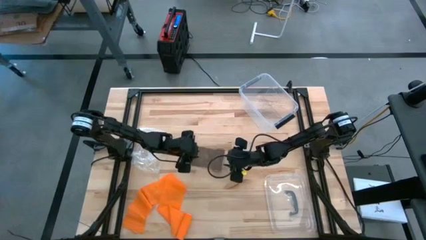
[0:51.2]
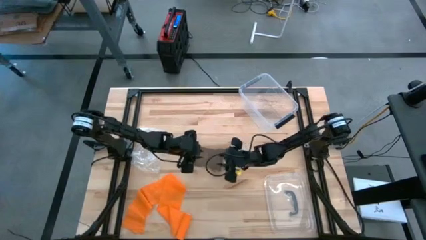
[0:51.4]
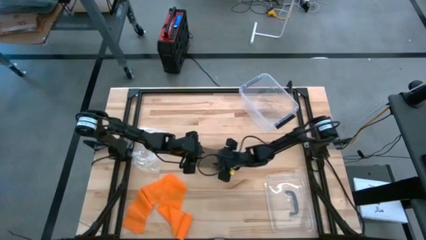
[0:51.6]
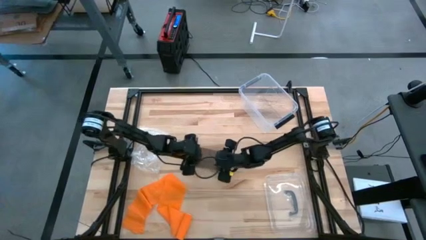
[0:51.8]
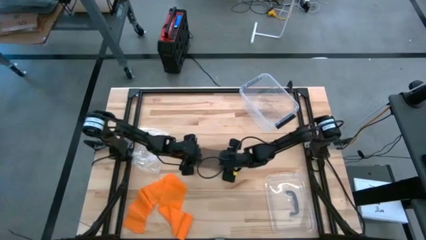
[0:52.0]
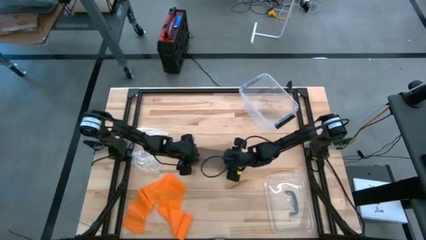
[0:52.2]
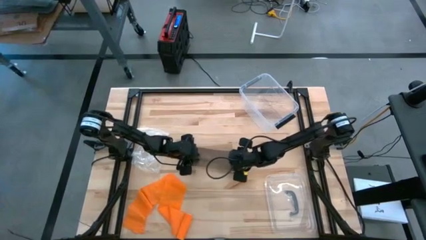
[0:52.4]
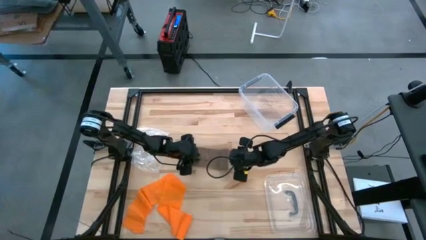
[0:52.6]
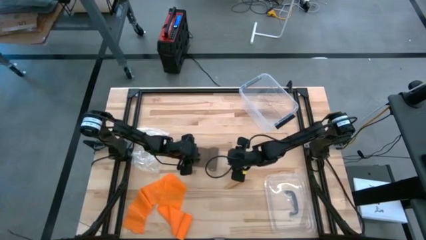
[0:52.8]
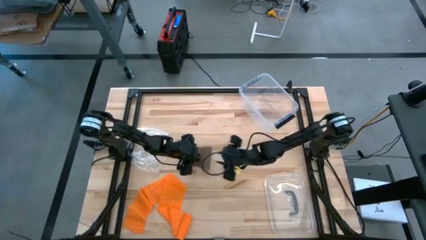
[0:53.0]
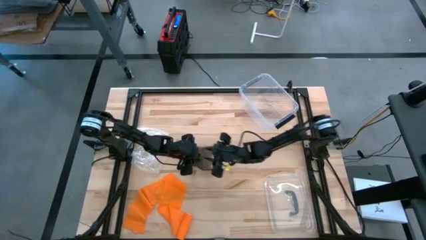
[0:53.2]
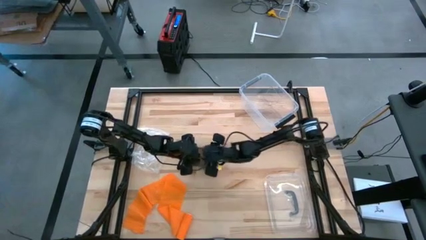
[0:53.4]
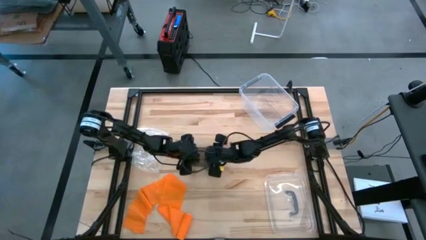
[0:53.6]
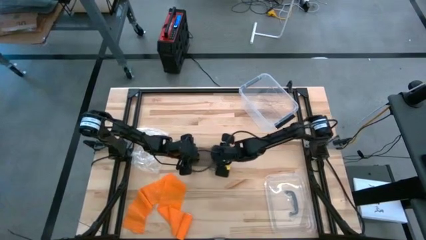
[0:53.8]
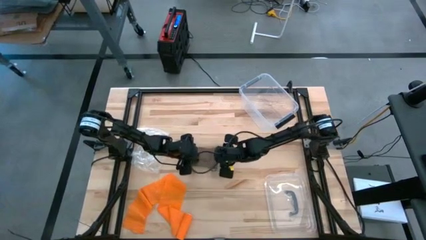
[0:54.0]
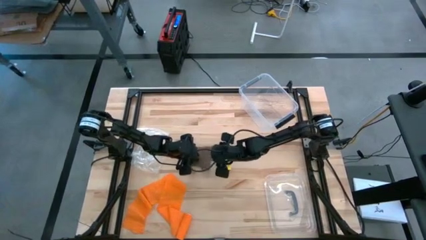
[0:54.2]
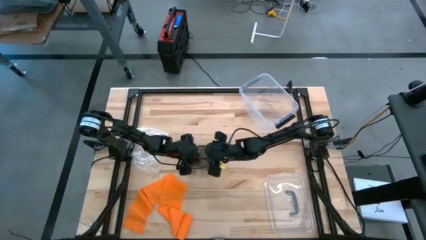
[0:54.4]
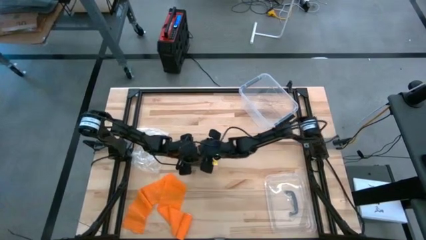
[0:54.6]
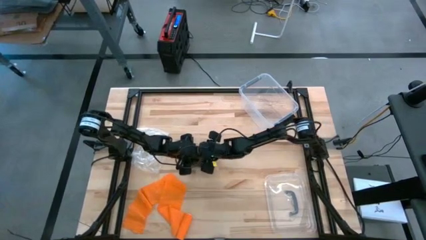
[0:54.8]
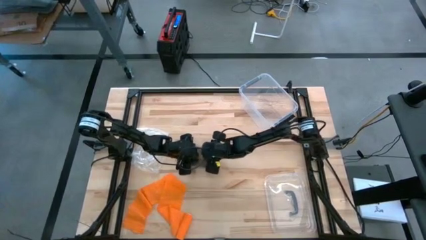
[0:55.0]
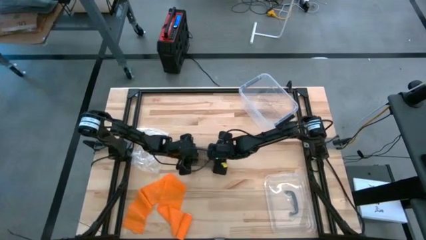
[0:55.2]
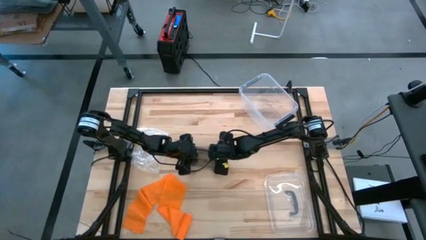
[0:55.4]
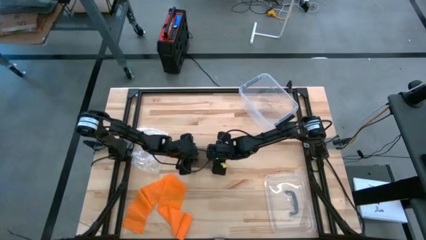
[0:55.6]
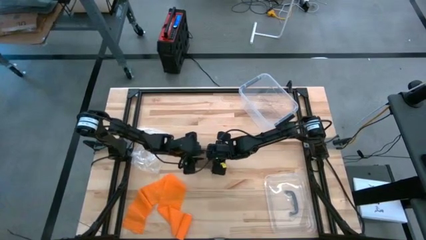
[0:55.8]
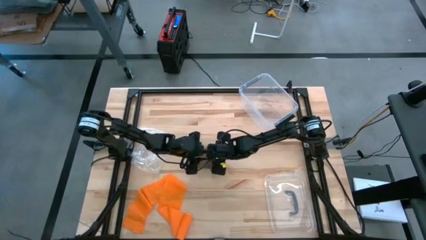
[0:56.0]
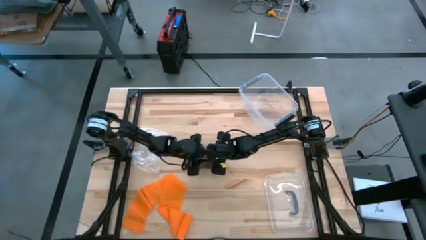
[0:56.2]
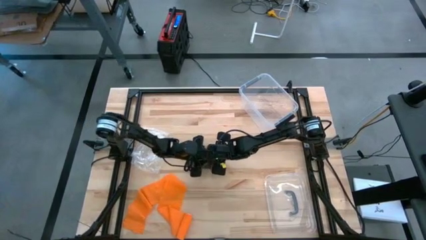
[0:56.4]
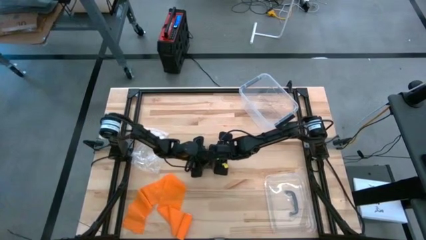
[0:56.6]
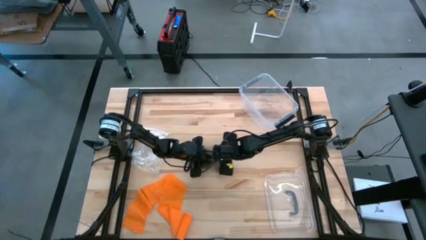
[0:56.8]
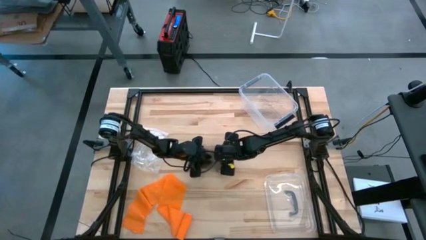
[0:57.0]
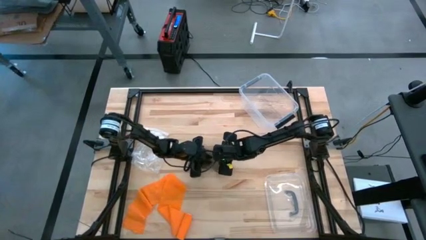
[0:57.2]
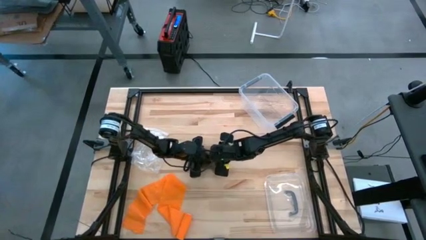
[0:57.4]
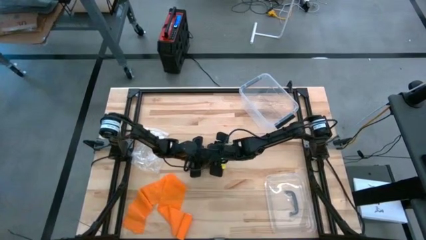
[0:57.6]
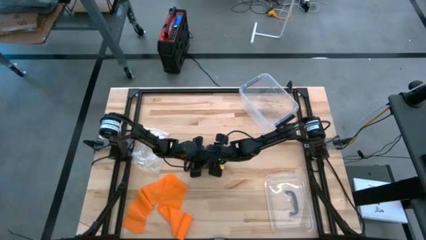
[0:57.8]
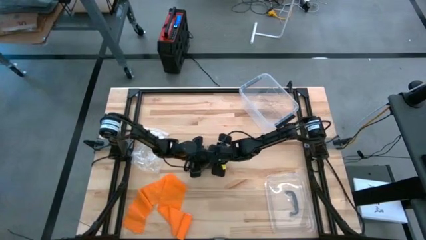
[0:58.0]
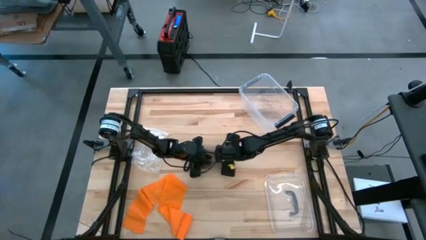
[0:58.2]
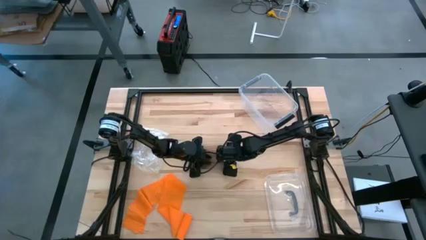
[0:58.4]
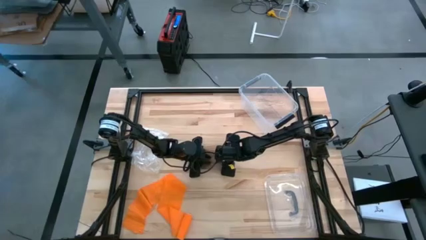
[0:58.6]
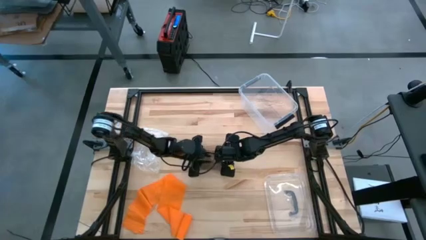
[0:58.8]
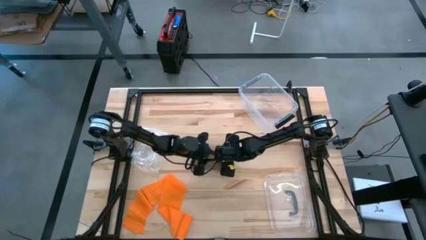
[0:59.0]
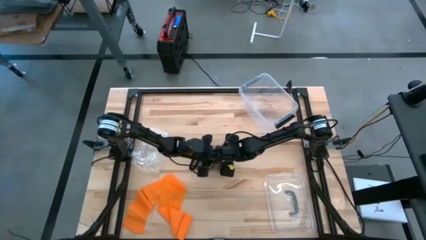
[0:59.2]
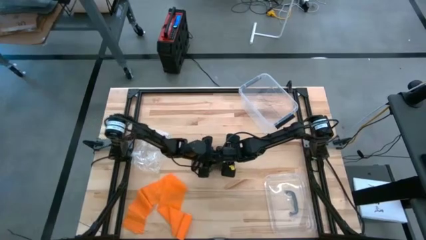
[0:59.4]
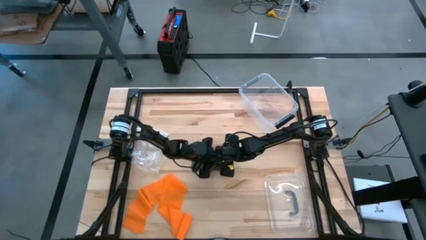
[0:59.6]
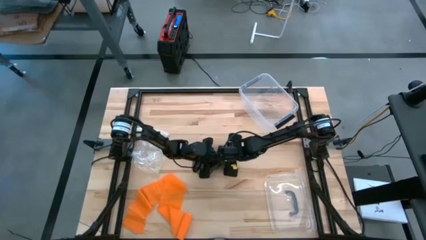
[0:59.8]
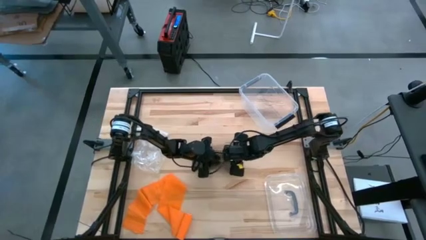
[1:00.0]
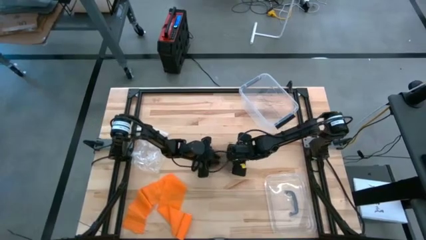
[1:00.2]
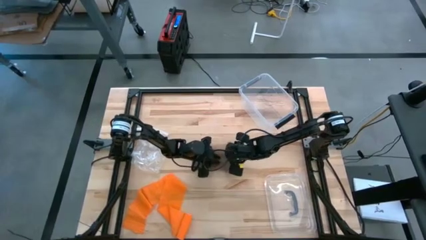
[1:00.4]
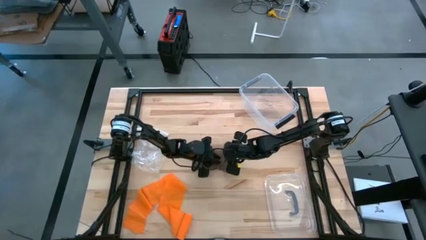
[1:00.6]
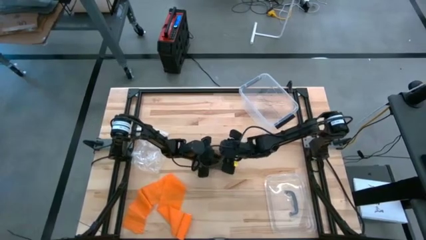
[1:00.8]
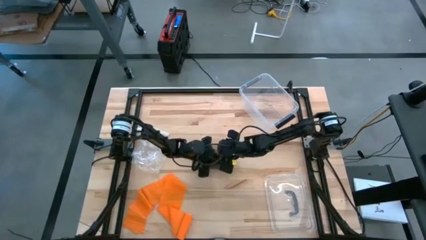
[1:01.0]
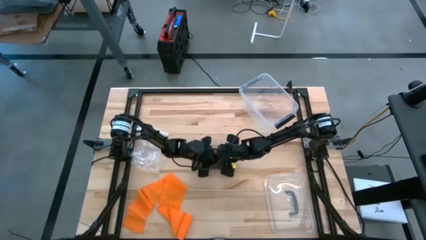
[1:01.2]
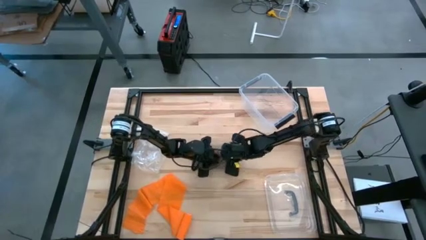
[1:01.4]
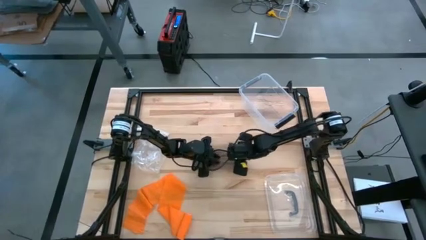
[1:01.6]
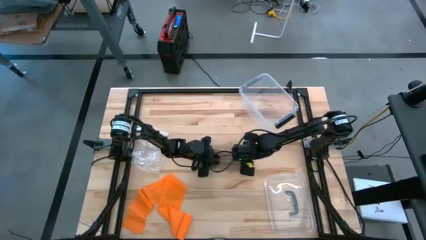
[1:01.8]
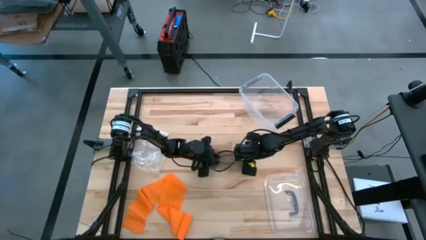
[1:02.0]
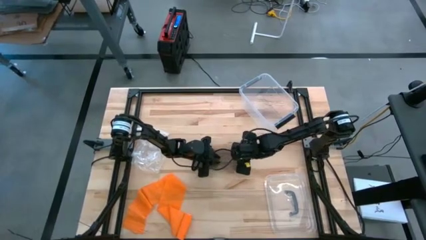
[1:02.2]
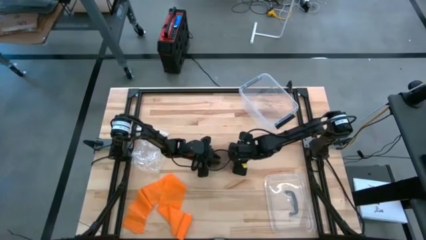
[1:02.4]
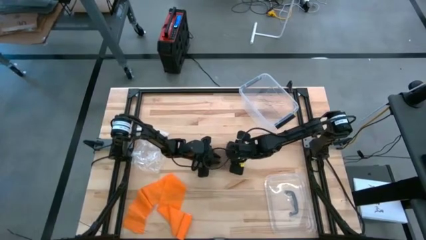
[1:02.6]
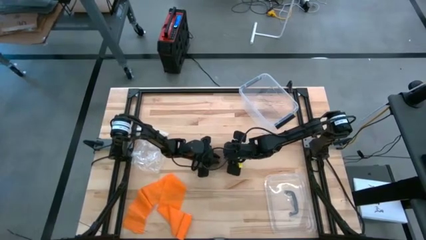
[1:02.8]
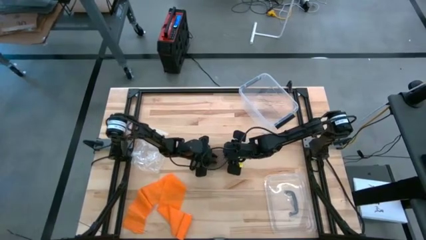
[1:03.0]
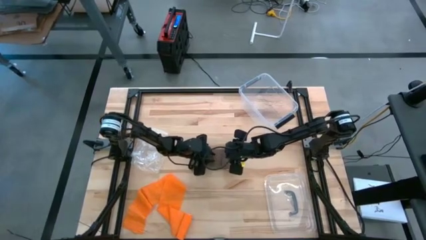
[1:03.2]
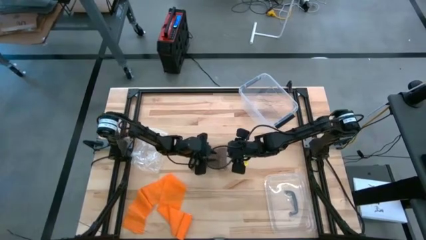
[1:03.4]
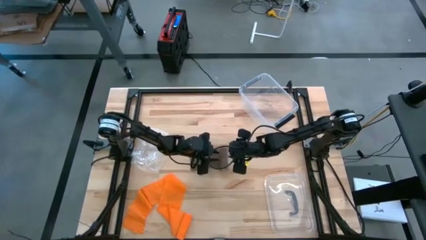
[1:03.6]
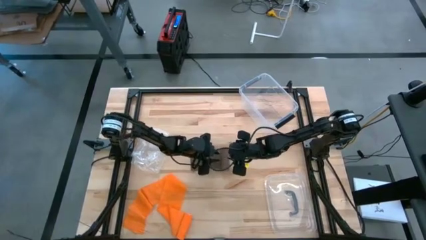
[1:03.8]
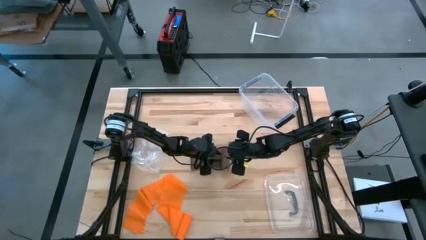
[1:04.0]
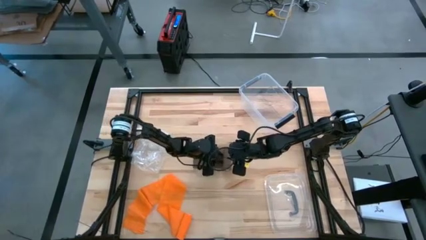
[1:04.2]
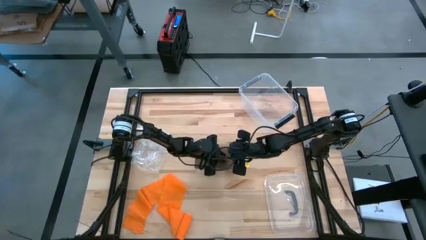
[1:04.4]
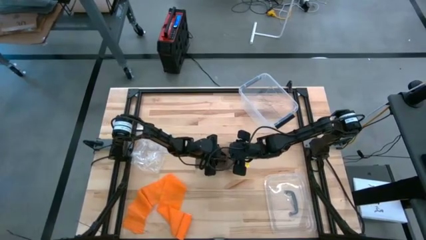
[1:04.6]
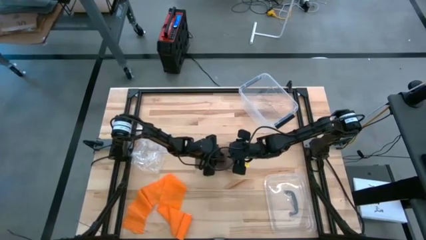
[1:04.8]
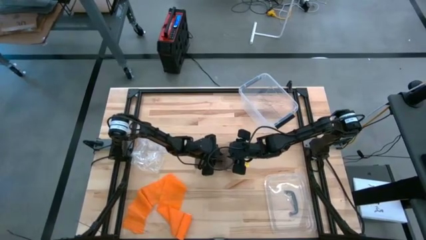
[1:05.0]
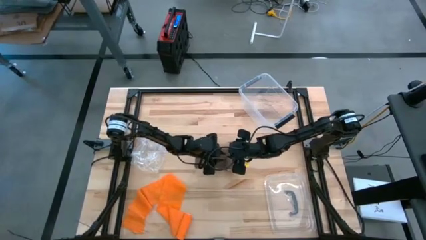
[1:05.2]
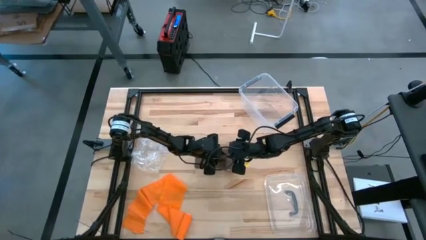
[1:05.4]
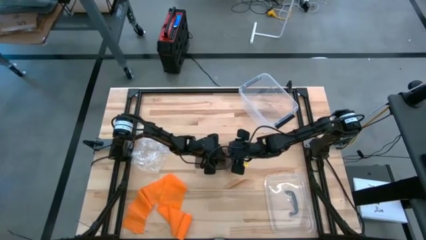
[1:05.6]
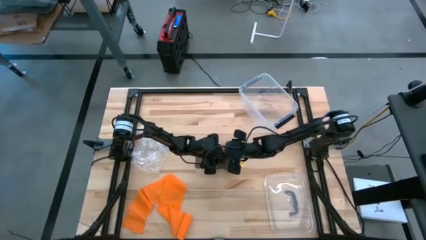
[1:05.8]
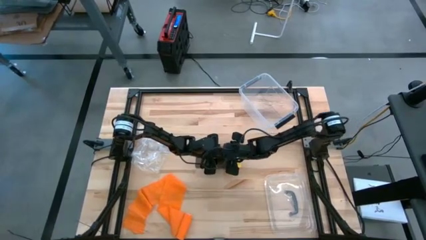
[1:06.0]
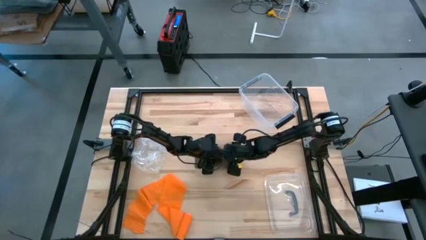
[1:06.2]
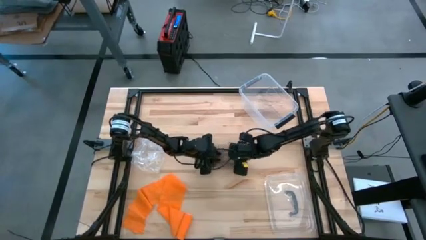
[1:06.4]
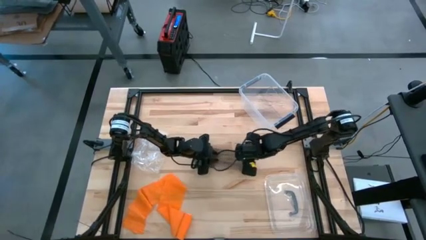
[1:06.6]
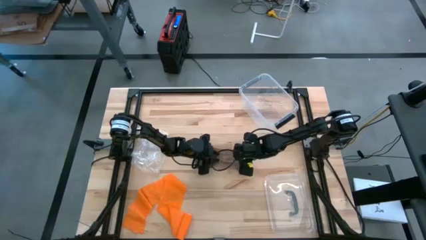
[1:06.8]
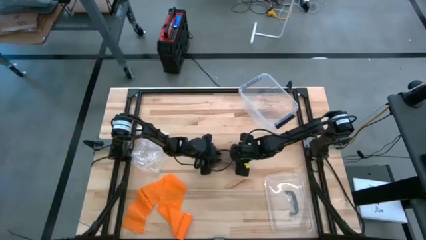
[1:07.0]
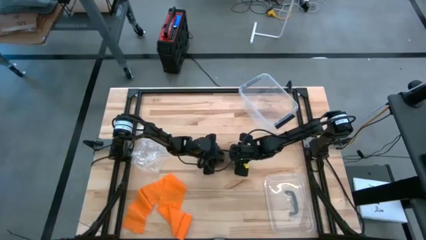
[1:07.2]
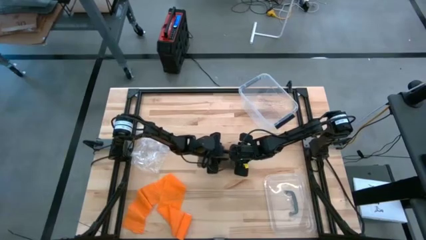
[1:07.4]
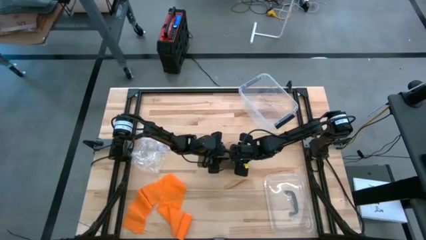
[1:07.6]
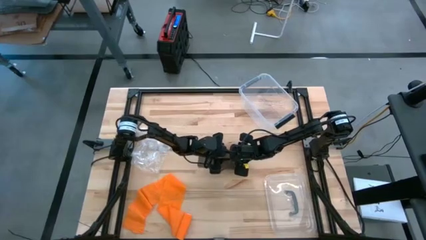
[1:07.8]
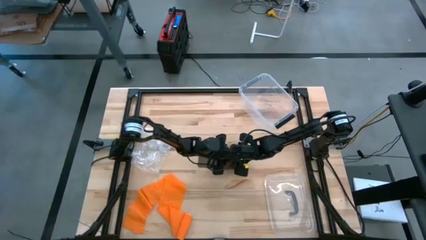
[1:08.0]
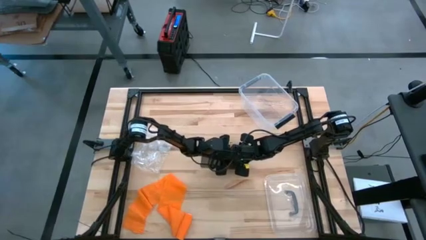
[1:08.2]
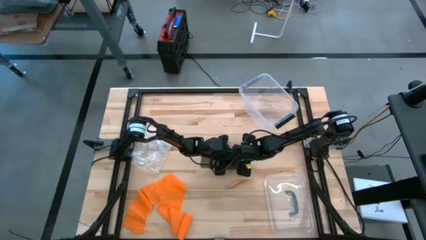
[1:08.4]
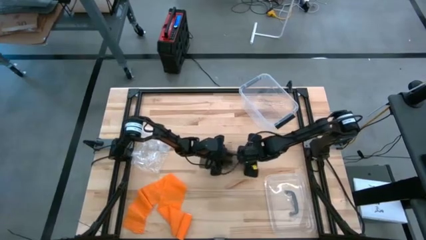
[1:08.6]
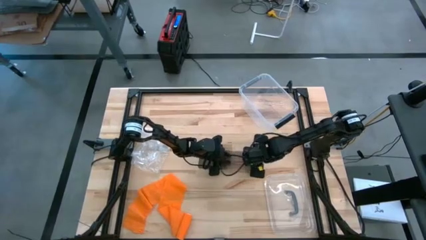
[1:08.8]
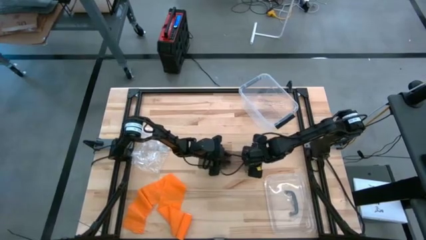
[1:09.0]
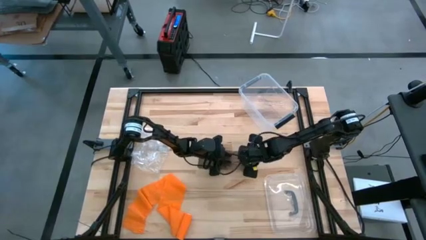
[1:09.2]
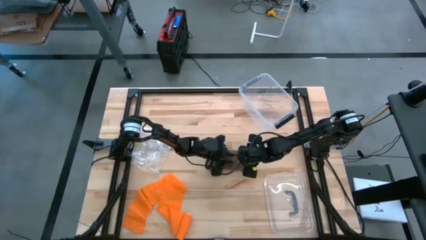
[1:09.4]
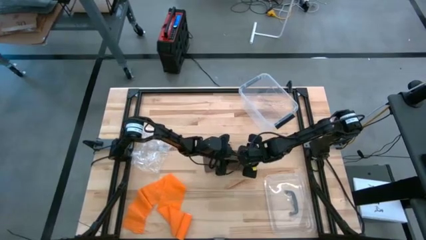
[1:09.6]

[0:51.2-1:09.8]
Task: Roll bandage
Uncoil the brown bandage
